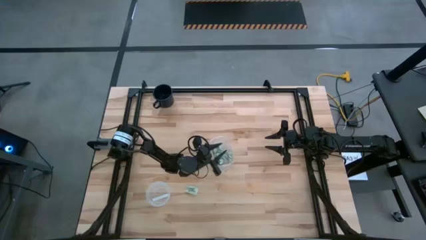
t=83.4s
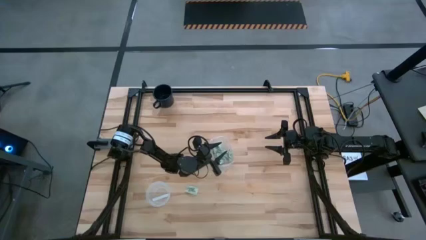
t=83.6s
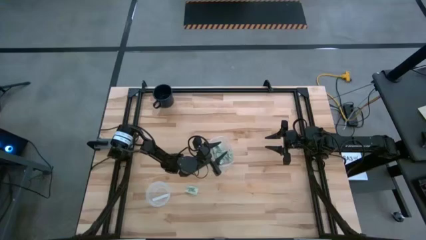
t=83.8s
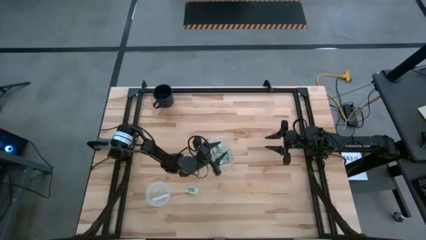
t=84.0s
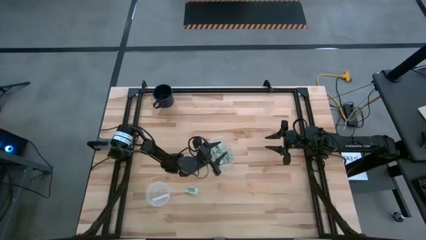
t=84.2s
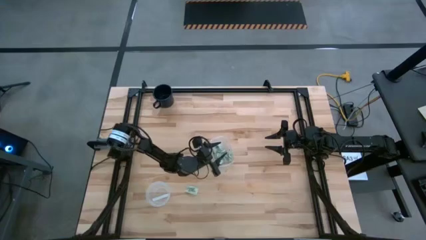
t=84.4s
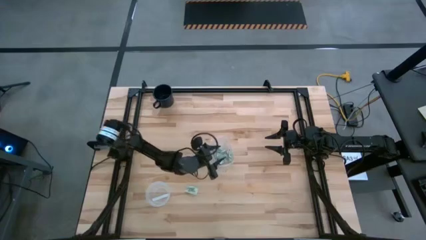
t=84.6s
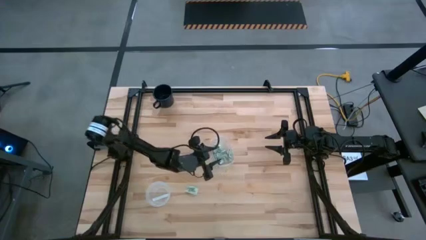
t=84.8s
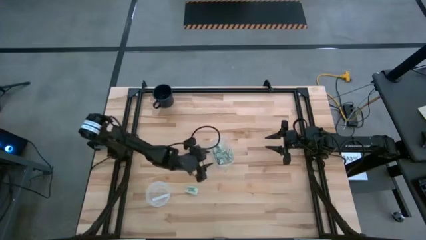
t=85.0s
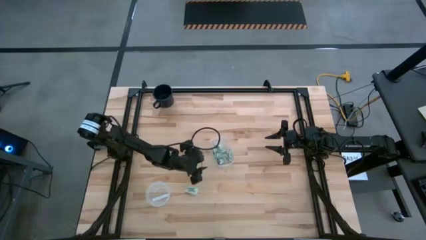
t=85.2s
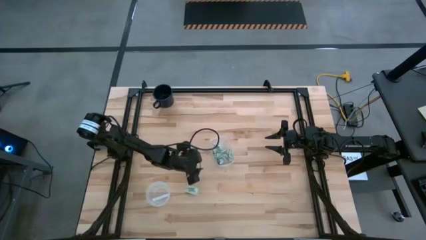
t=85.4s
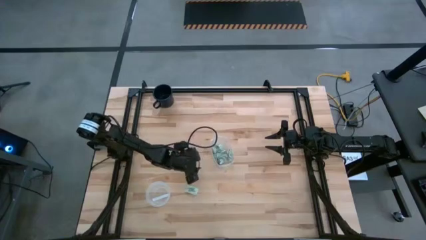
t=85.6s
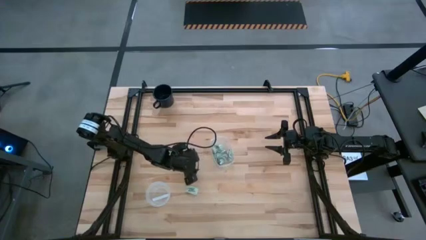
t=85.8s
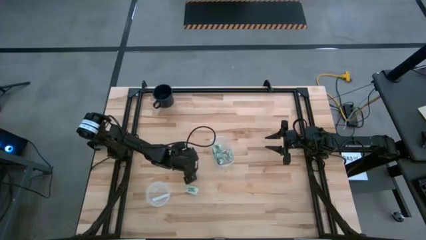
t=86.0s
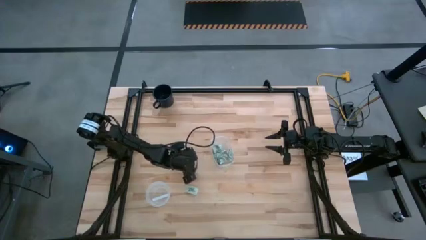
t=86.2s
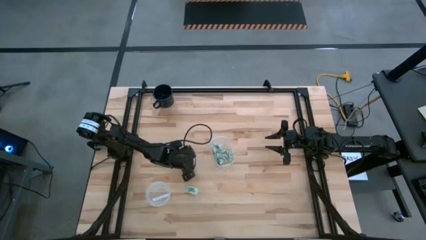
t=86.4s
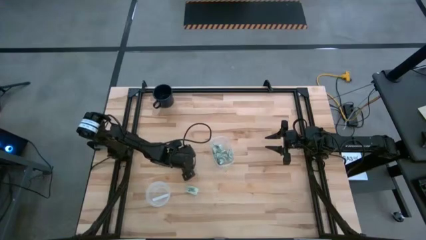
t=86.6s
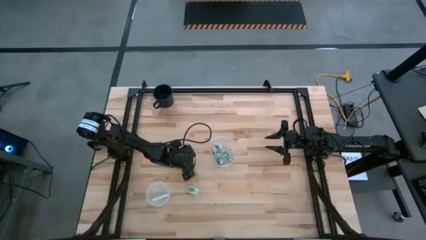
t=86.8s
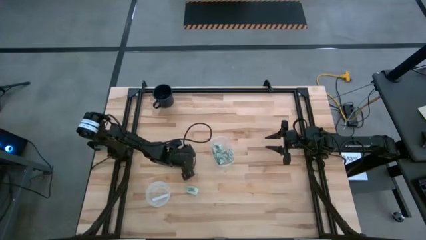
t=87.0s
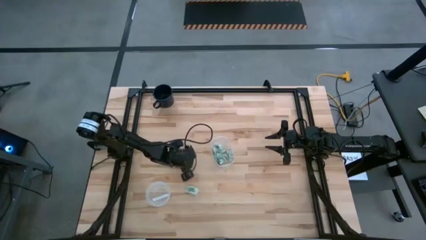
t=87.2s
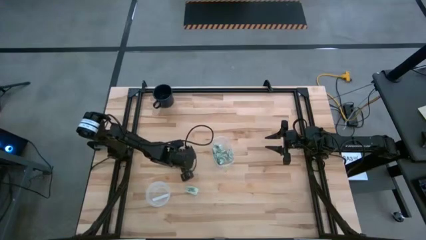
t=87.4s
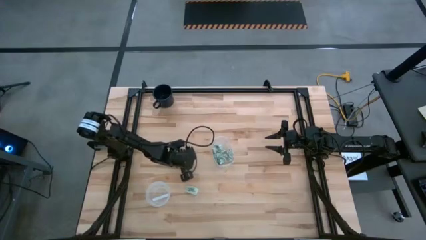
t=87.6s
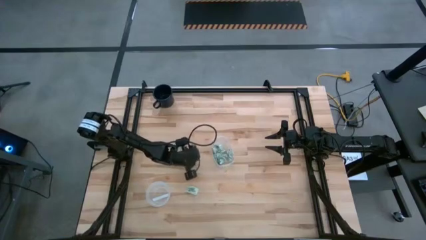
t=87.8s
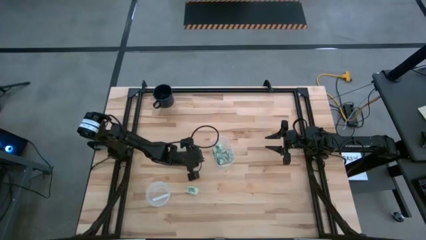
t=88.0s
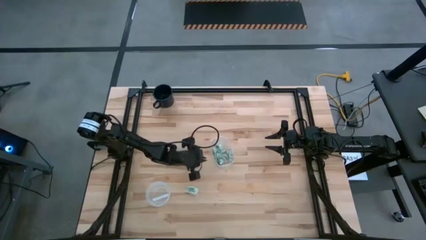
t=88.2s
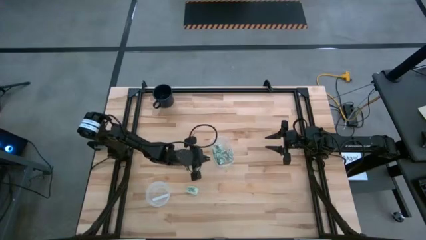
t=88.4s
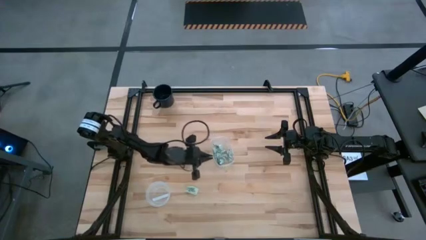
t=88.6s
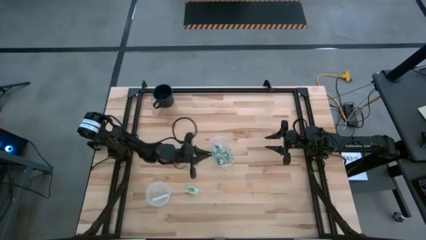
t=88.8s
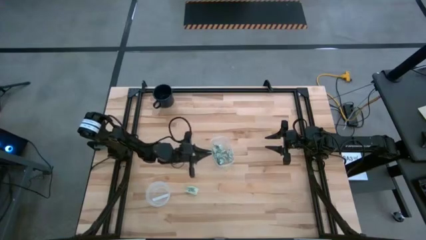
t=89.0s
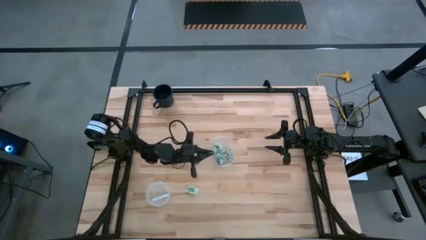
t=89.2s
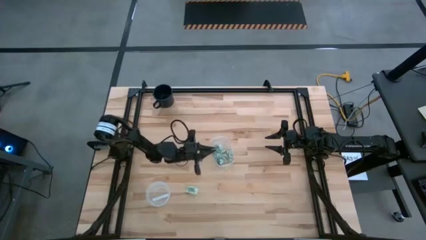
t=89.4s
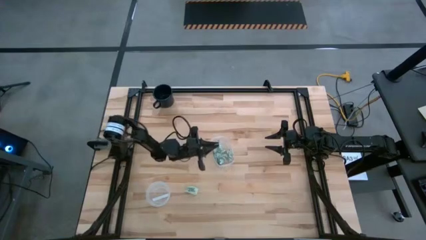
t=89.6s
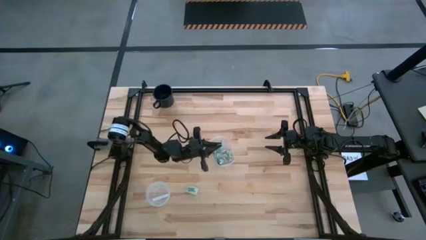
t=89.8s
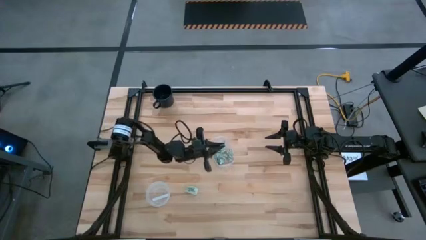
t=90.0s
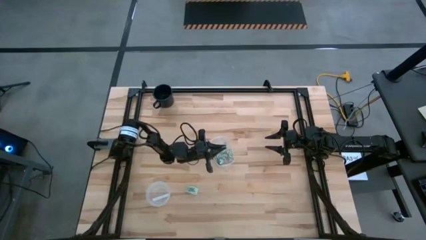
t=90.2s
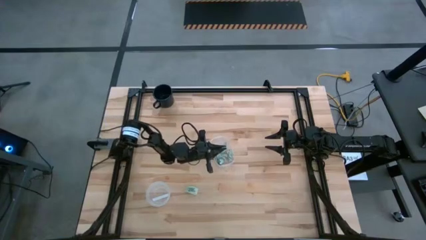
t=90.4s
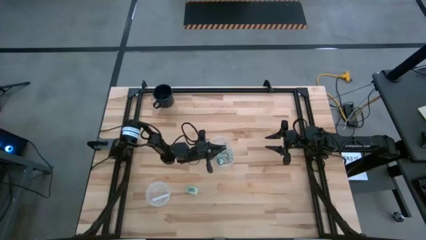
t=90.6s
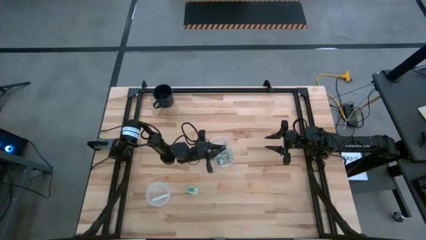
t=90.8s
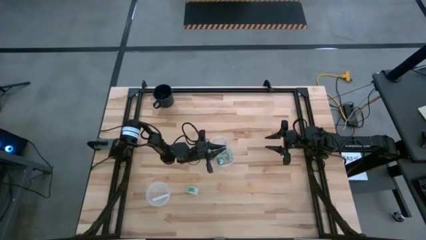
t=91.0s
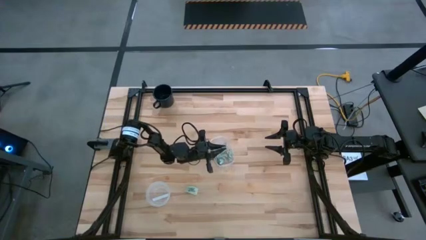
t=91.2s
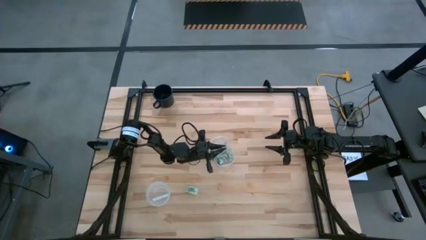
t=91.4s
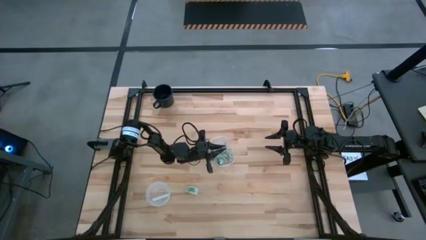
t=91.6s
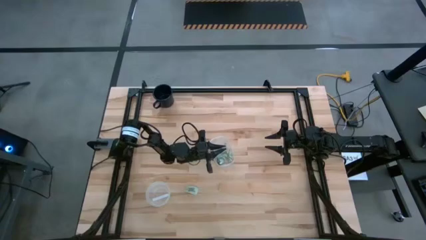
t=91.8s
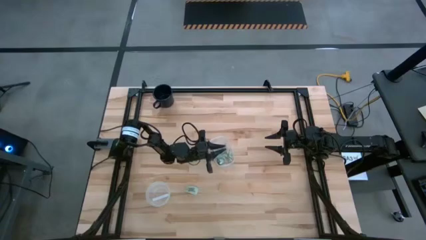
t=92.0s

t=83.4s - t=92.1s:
Task: Pick and place items into bin
Put the stevia packet into the transparent bin

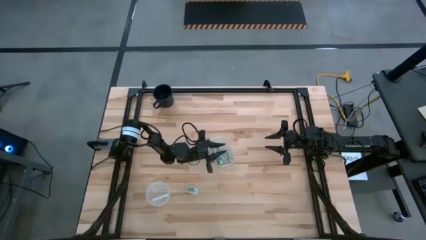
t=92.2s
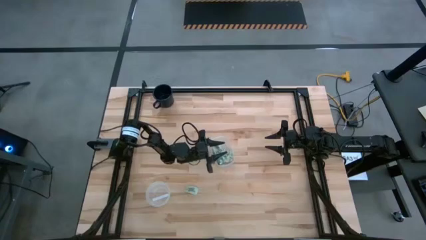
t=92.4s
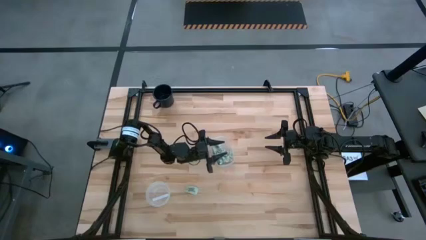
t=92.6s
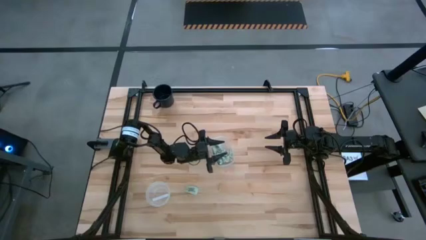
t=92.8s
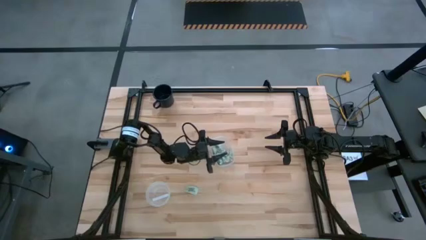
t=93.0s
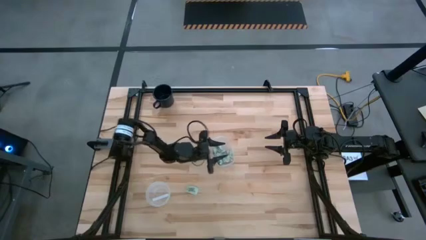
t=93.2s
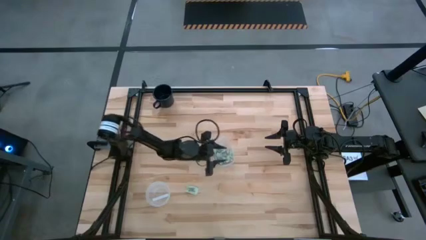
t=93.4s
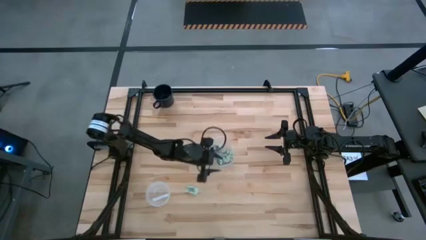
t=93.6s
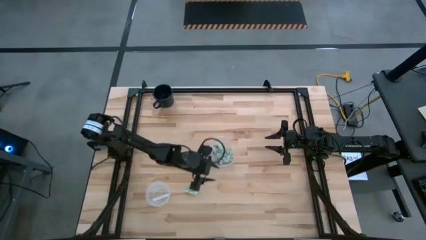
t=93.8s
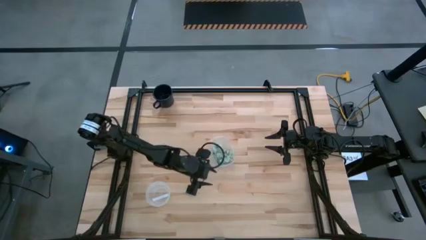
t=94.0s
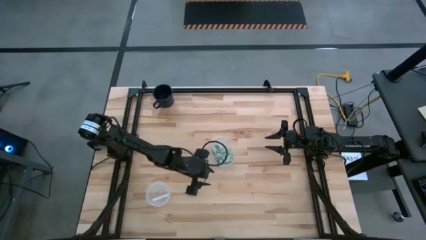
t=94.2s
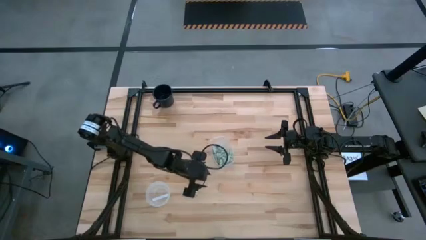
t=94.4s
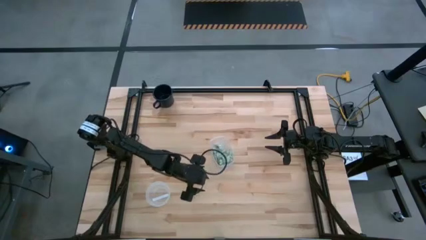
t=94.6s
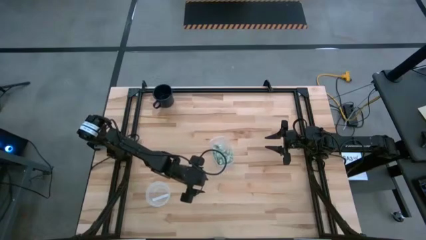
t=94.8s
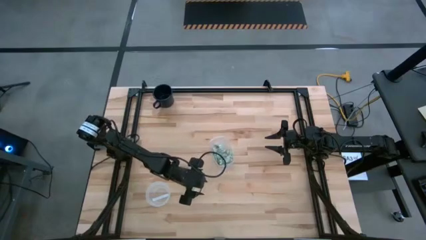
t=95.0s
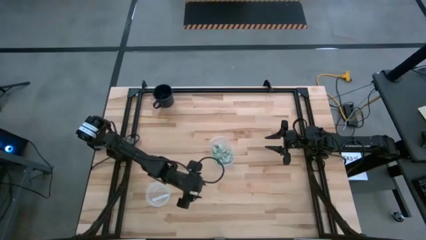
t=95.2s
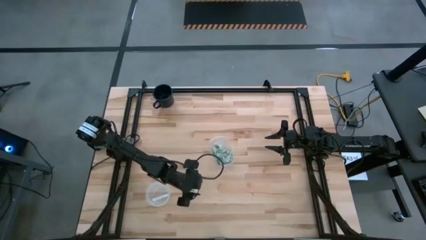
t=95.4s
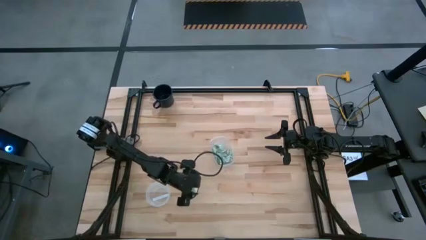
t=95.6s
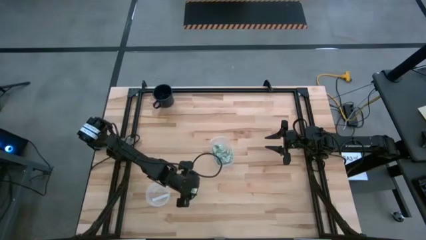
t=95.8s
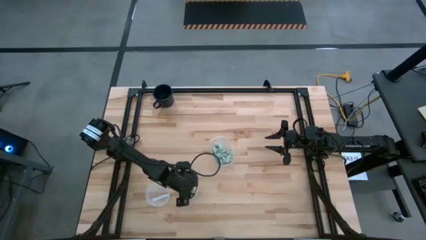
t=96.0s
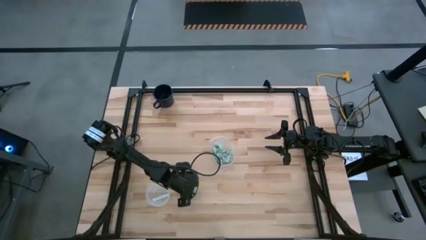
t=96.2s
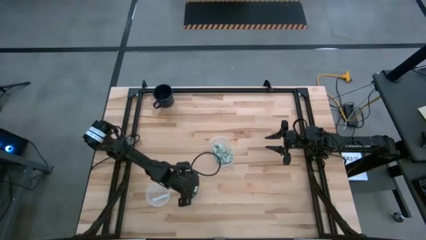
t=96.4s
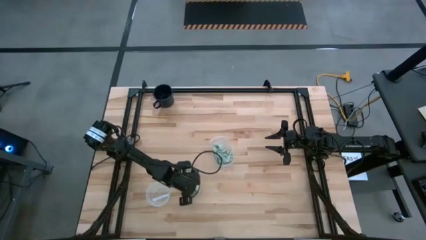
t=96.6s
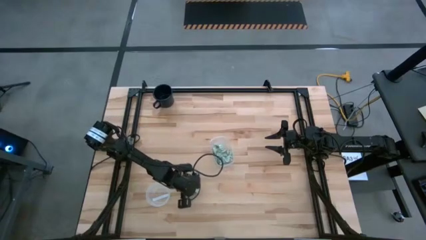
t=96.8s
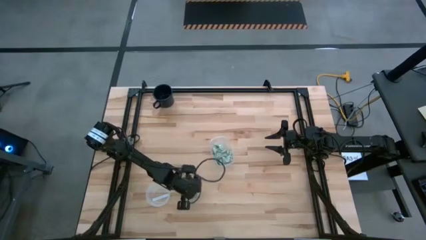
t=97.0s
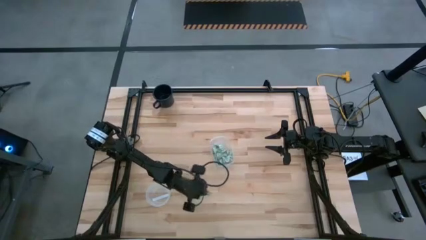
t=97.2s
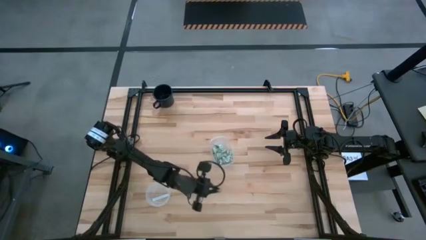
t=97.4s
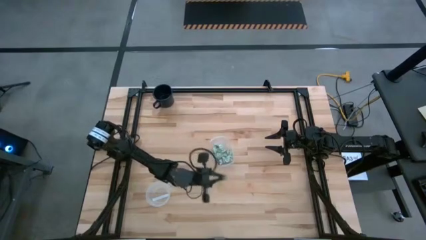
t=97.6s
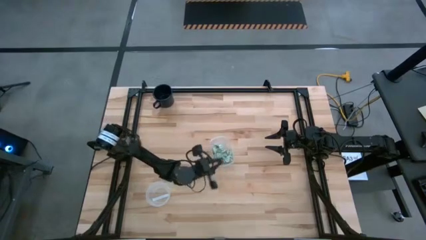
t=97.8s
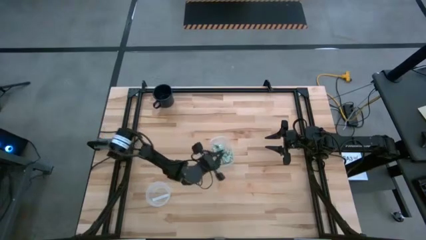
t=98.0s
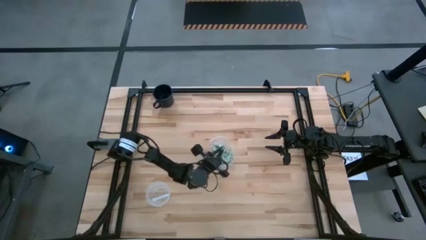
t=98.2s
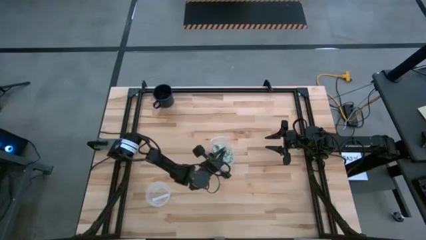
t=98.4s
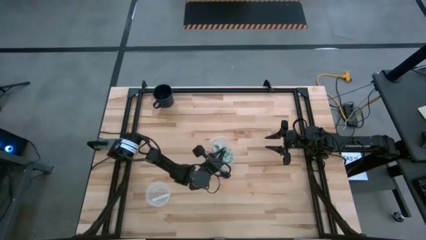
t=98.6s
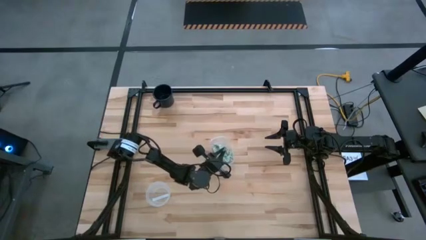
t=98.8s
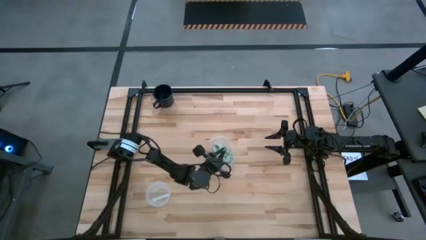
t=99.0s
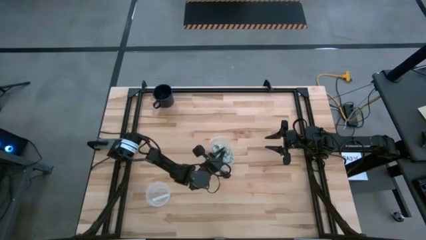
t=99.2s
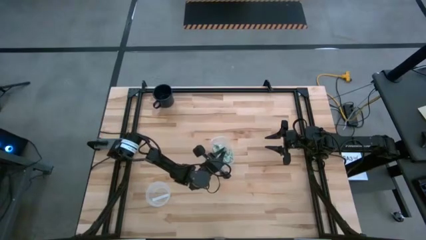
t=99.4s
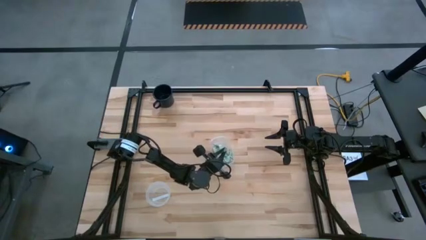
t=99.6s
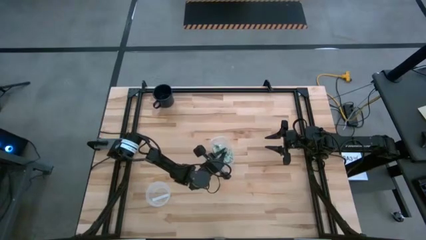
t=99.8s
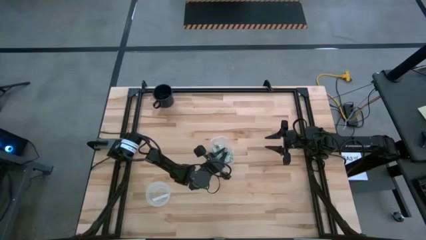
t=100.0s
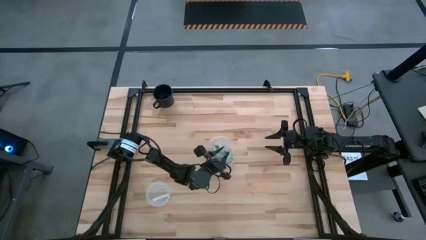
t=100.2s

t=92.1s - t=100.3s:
Put the stevia packet into the transparent bin
